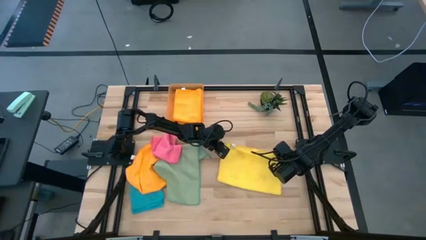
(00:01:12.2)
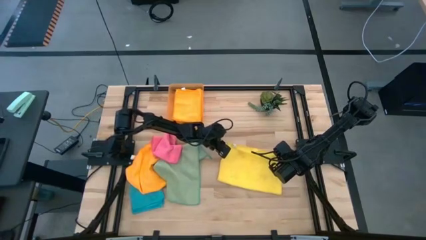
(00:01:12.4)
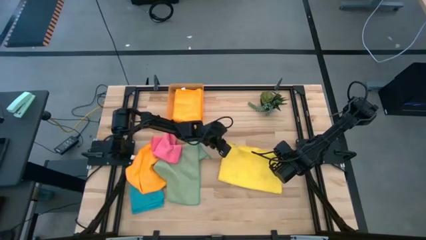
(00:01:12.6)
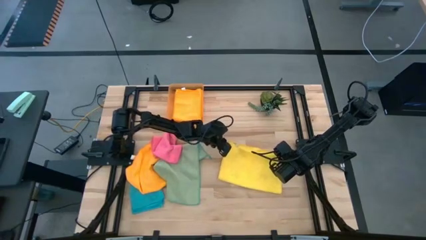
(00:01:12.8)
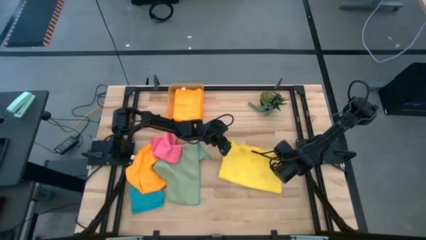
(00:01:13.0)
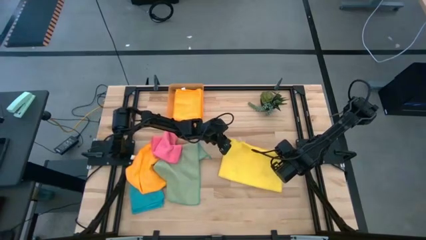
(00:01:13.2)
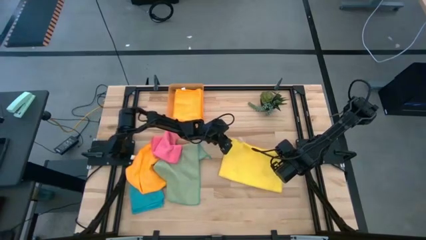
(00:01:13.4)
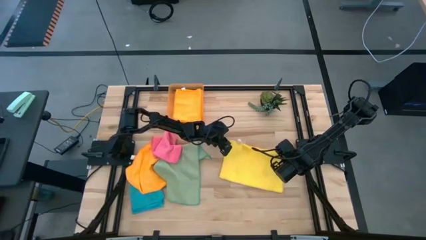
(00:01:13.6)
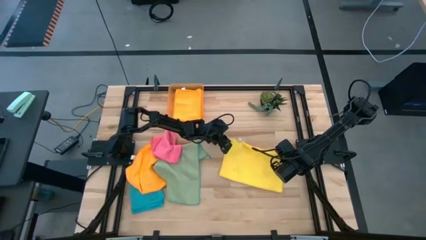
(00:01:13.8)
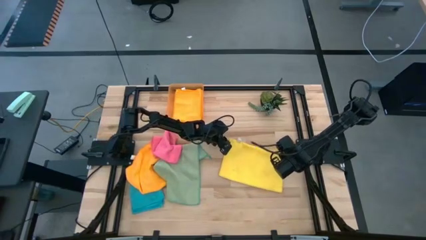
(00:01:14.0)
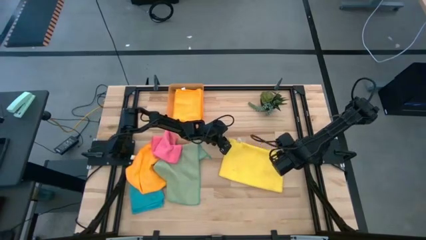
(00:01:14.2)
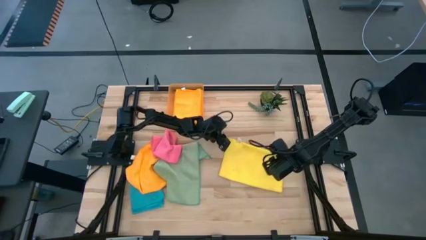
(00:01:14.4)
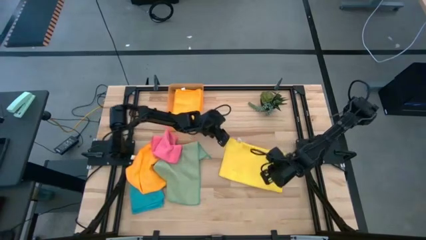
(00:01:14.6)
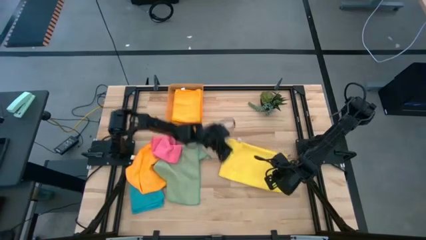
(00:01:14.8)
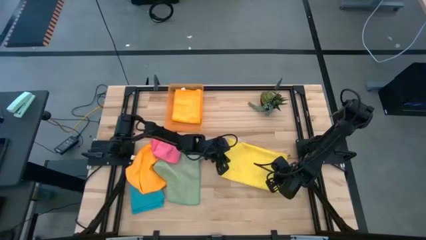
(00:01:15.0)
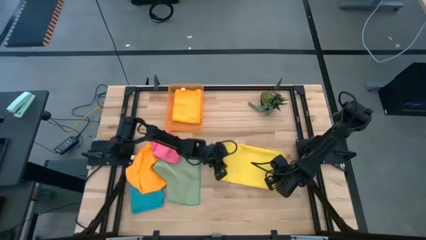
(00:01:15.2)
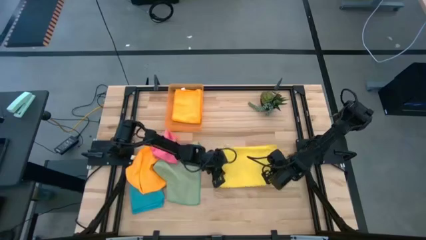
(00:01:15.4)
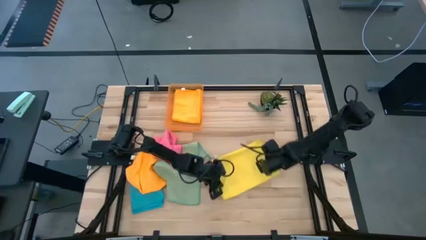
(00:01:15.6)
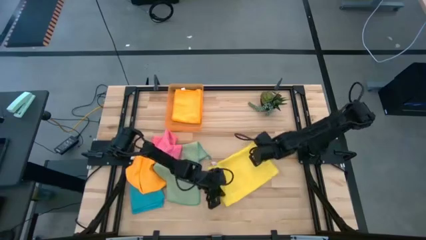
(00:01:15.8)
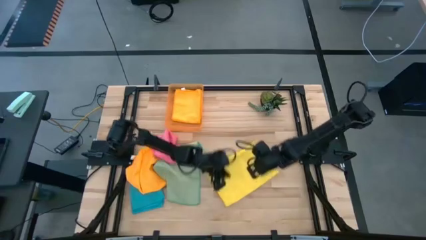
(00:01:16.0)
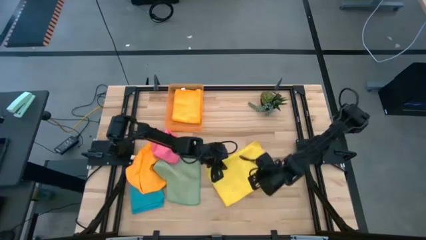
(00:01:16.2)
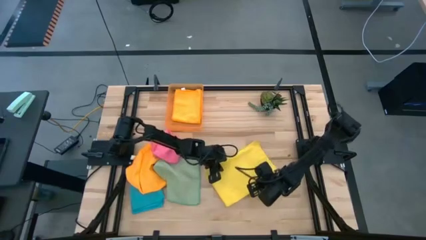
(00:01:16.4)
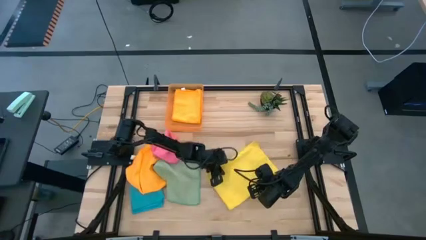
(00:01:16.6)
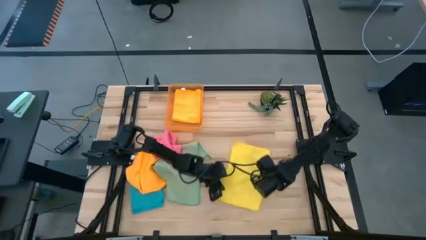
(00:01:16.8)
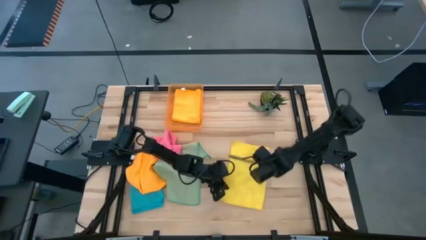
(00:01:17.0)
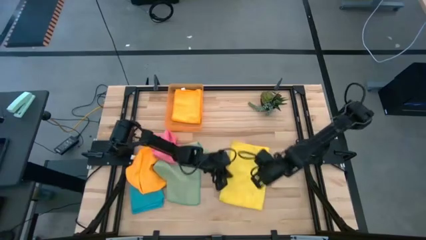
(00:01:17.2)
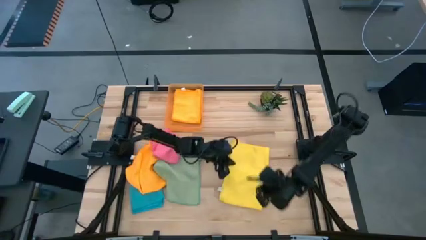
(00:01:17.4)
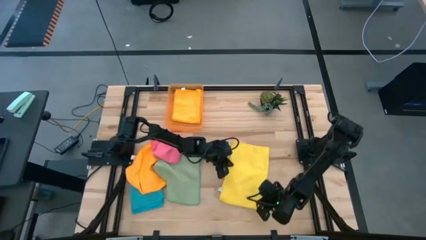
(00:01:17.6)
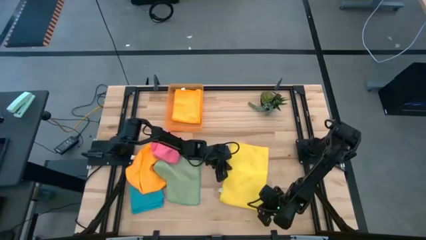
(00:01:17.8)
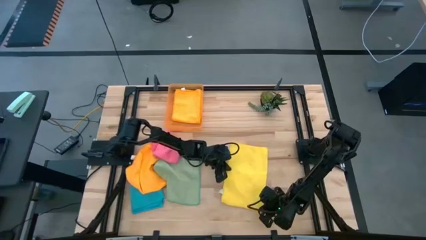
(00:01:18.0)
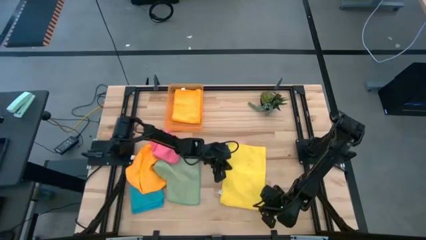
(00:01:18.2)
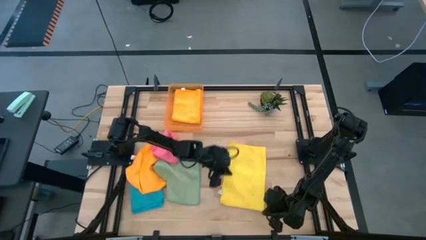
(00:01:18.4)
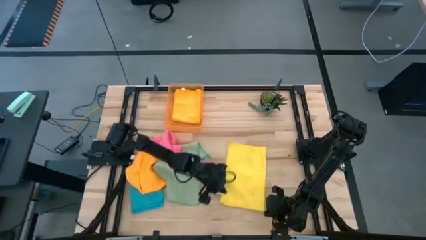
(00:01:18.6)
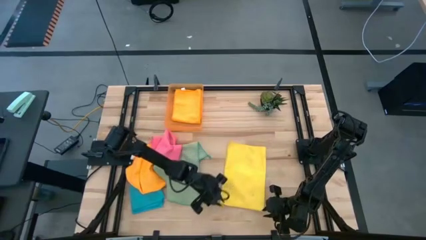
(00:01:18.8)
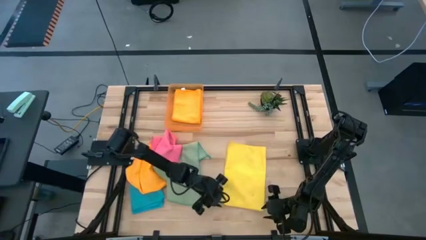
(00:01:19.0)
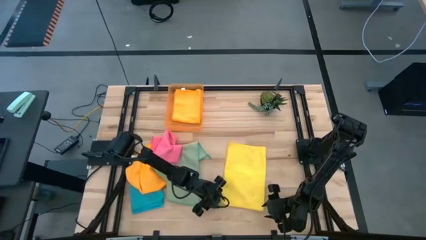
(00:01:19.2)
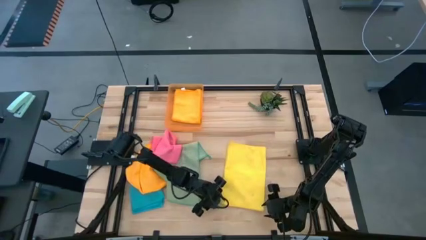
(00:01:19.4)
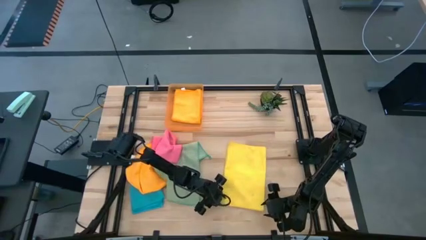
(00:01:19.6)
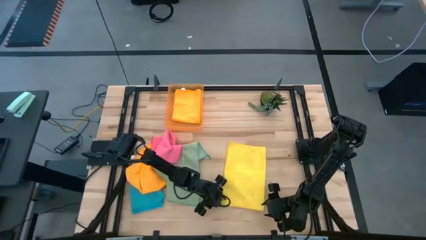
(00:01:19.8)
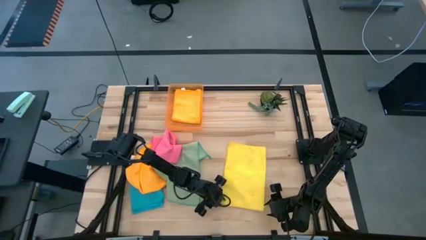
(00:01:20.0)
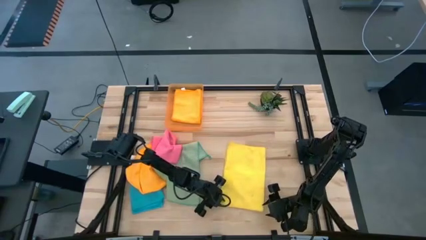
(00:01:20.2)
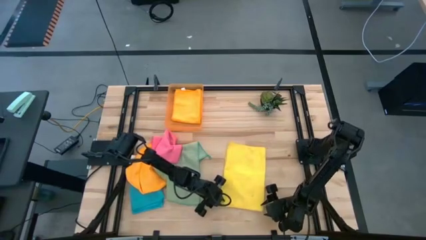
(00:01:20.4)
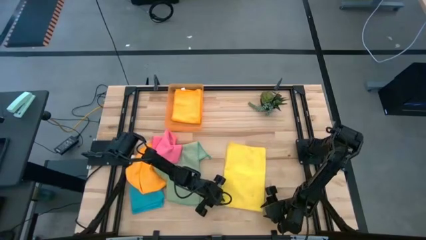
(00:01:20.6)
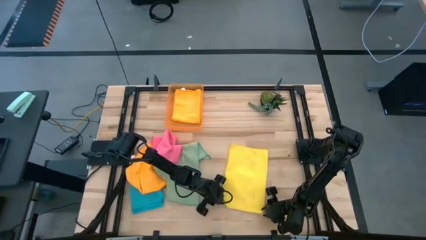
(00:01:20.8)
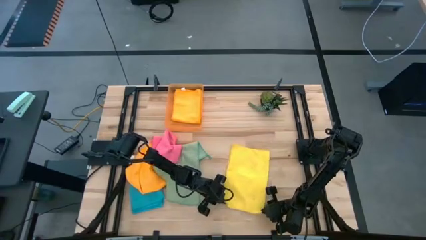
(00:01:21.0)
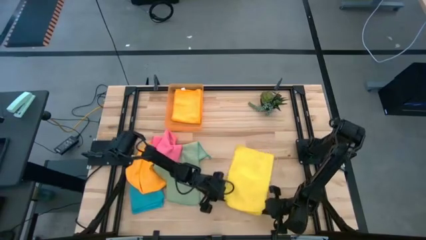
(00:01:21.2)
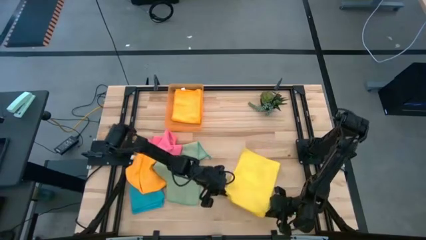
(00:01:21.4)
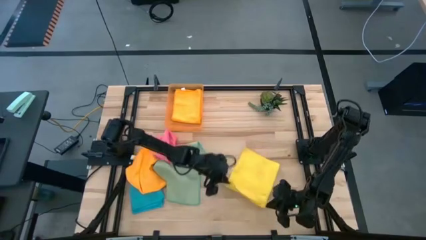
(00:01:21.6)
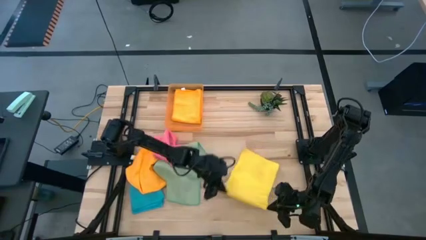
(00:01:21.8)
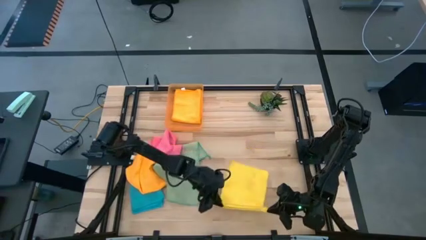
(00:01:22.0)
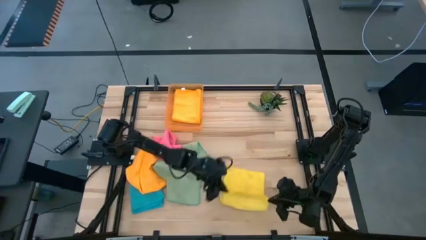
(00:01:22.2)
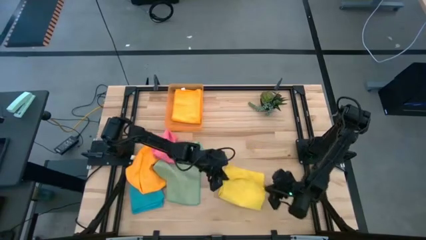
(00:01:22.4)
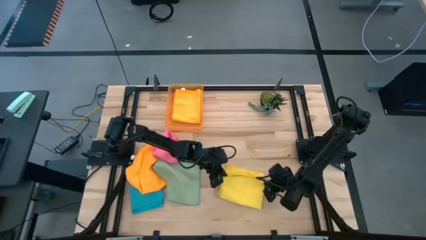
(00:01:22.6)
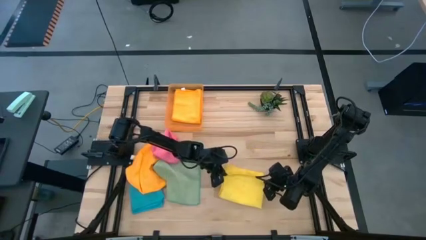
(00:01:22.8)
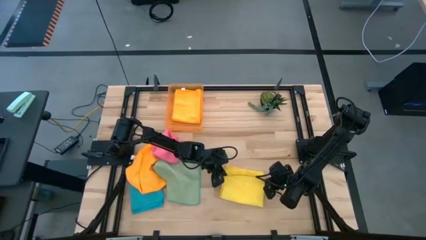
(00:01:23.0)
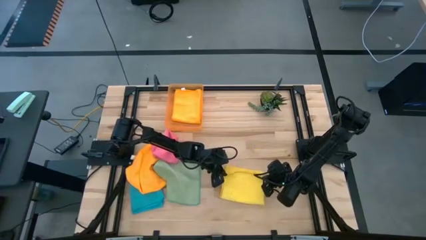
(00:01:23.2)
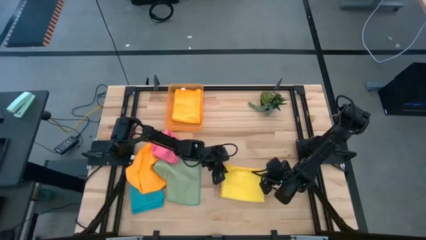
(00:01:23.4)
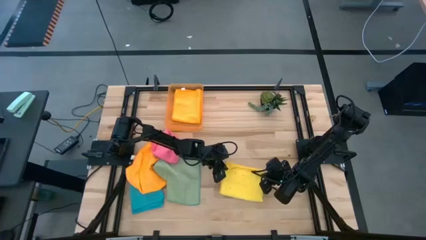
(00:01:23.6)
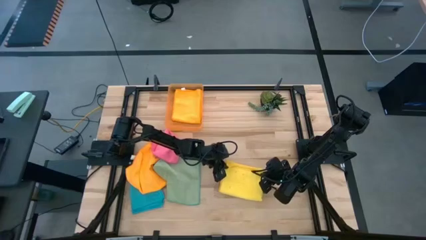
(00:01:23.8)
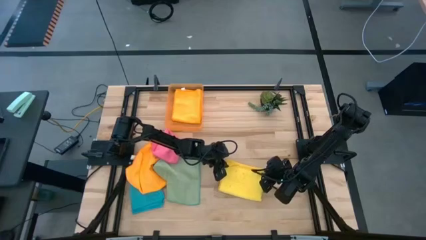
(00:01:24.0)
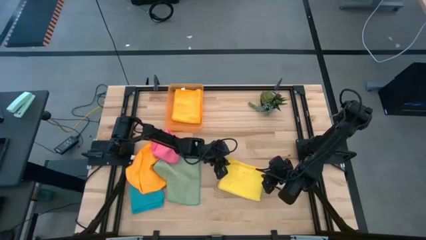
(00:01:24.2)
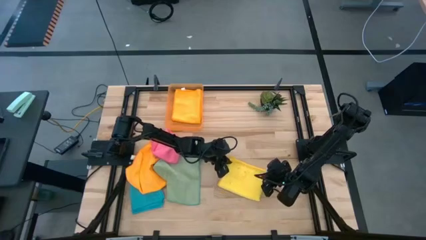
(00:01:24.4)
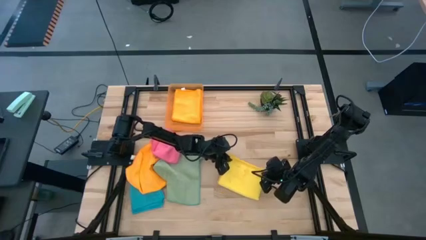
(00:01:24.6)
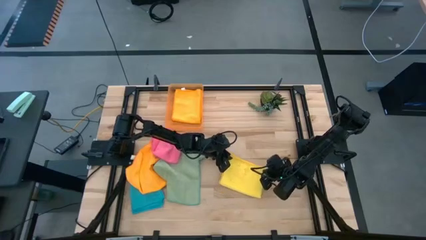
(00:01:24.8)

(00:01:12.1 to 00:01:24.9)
Task: Fold microfiber towels
Fold the yellow microfiber cloth
